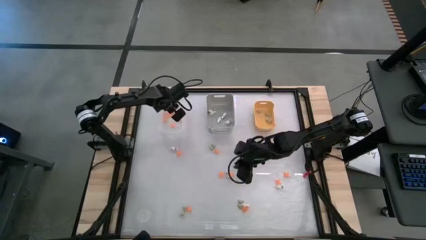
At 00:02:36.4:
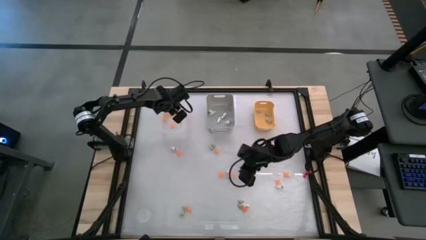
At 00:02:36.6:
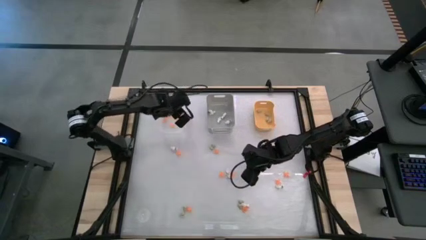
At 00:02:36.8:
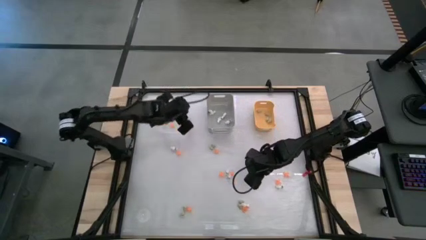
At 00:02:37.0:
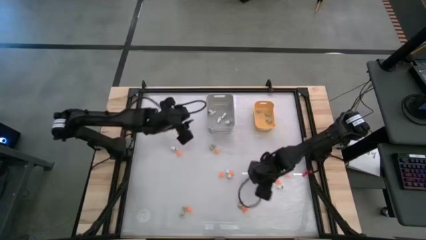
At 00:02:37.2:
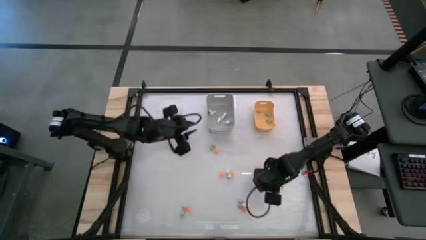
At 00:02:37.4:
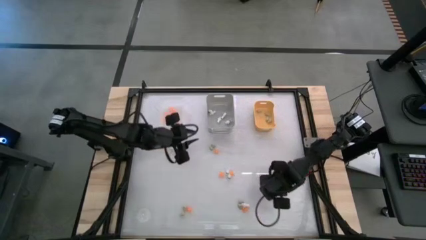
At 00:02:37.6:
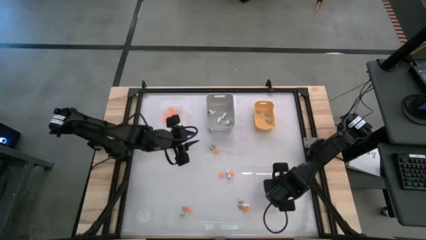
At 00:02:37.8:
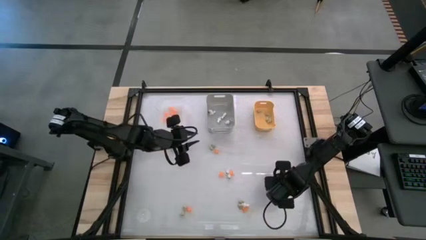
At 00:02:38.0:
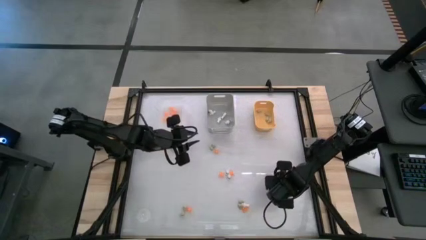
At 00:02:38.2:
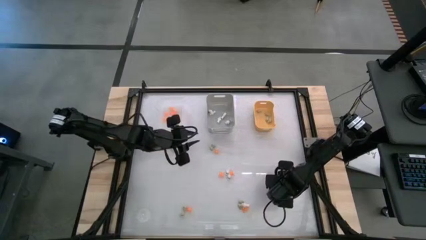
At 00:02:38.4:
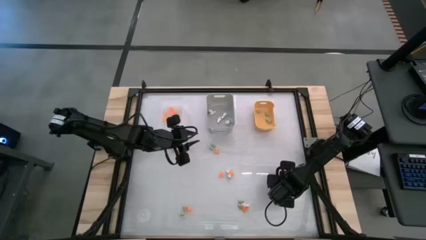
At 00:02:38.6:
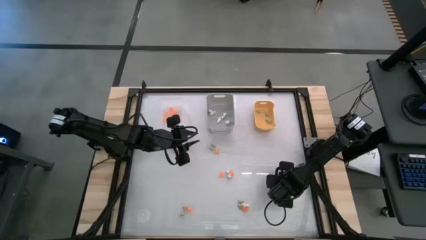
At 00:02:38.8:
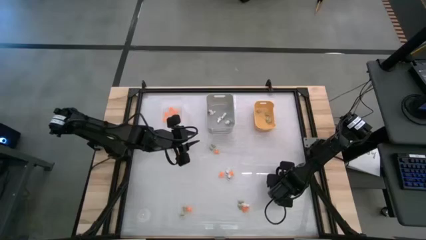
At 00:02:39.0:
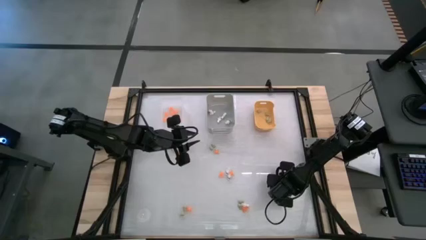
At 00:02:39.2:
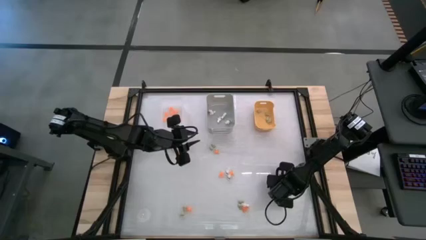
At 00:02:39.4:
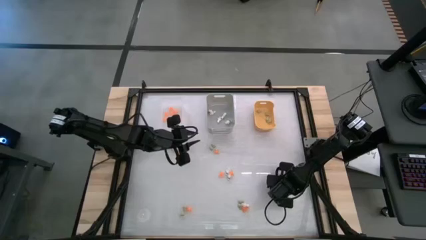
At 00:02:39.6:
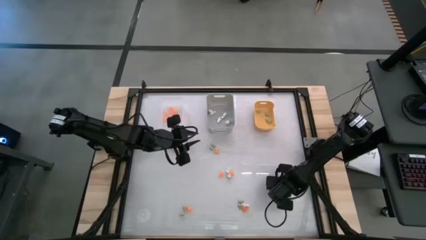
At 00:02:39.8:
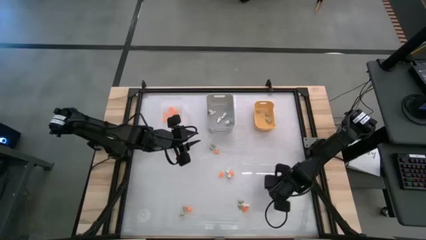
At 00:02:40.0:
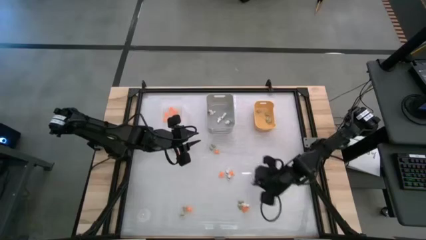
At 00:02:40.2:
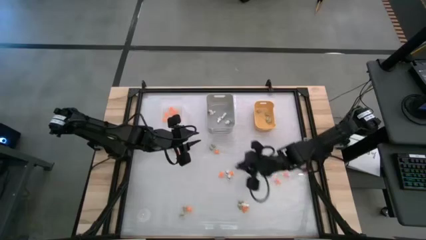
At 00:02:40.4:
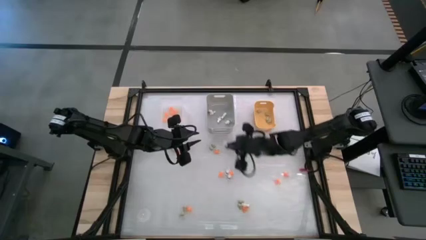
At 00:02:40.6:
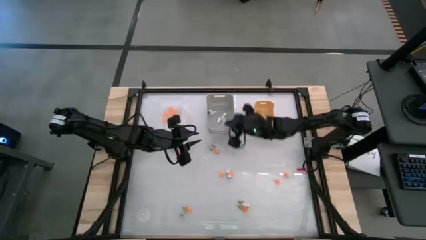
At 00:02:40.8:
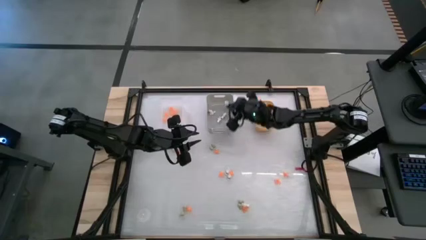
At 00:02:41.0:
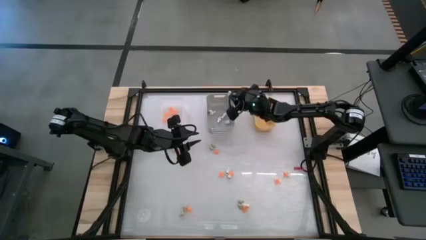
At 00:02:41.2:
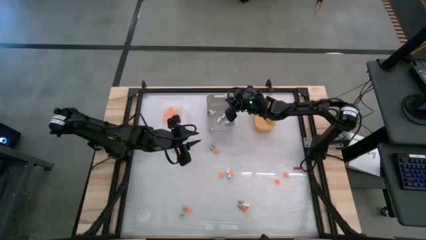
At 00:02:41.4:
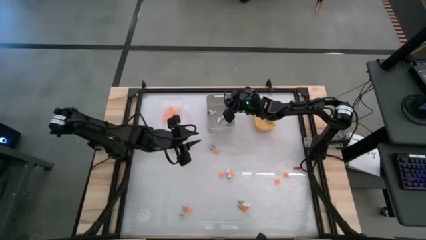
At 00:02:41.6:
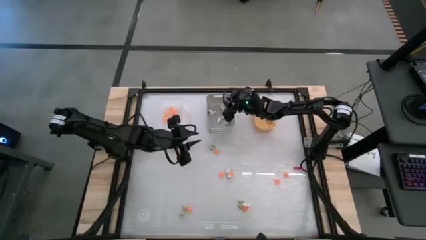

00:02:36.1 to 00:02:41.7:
Task: Sort Halloween decoration
Put the white skeleton toy into the gray bin

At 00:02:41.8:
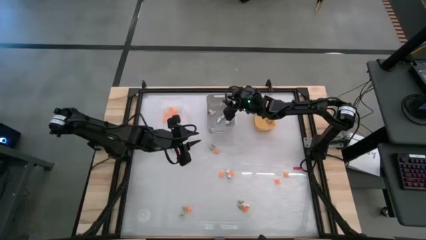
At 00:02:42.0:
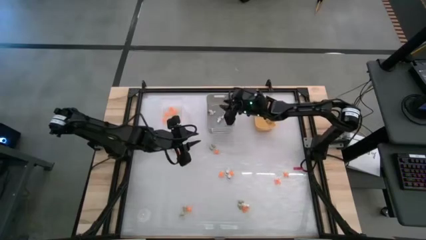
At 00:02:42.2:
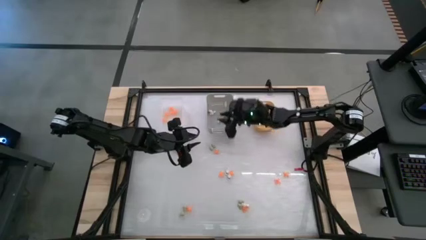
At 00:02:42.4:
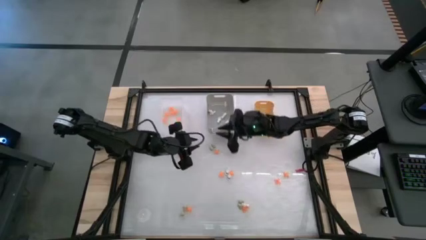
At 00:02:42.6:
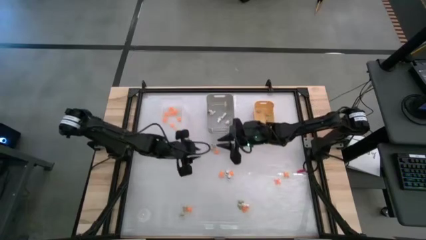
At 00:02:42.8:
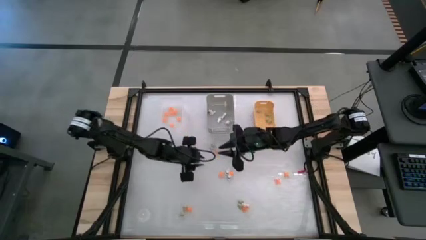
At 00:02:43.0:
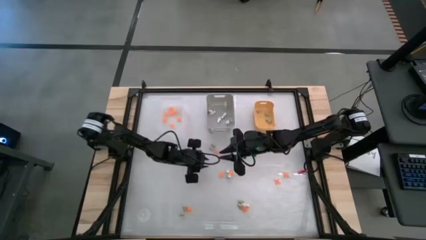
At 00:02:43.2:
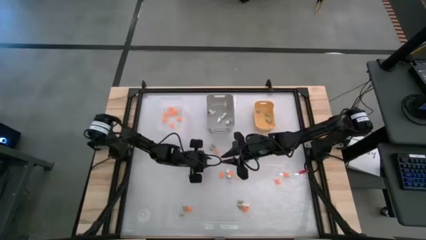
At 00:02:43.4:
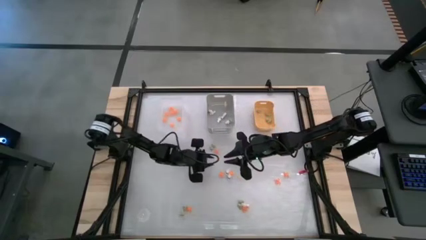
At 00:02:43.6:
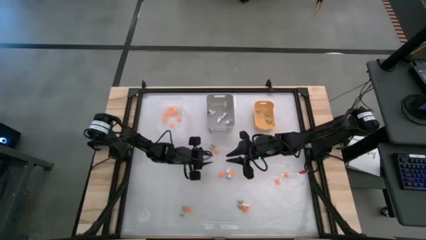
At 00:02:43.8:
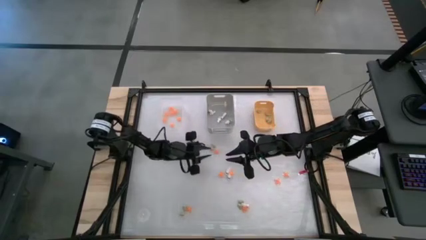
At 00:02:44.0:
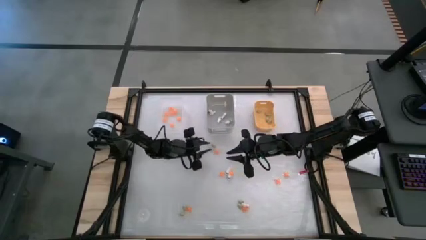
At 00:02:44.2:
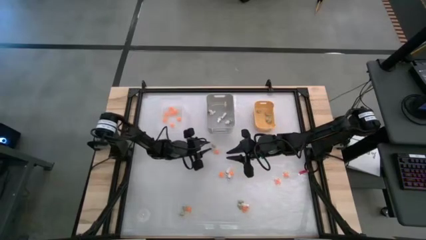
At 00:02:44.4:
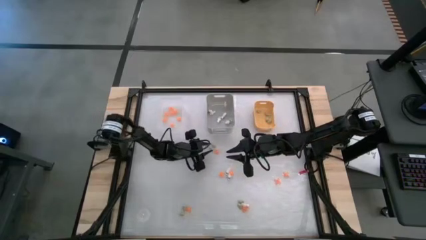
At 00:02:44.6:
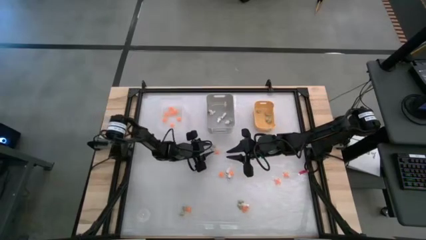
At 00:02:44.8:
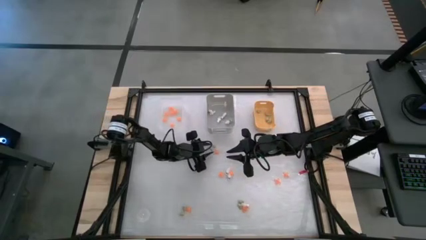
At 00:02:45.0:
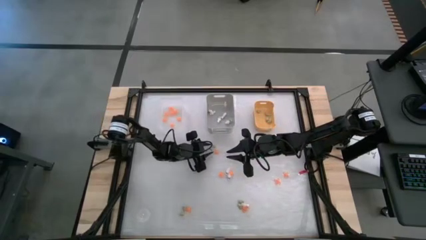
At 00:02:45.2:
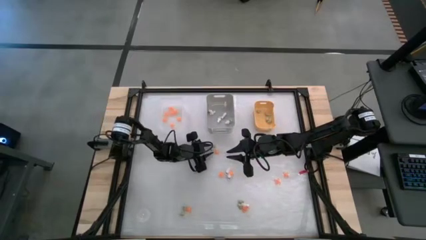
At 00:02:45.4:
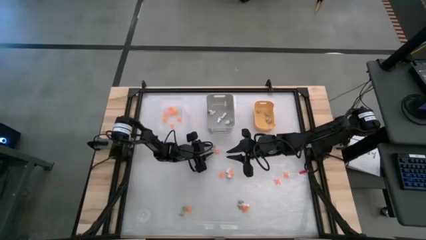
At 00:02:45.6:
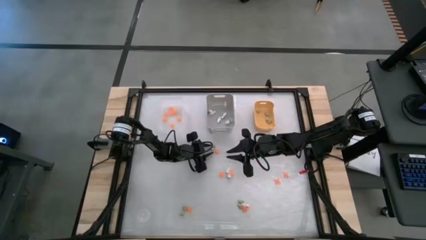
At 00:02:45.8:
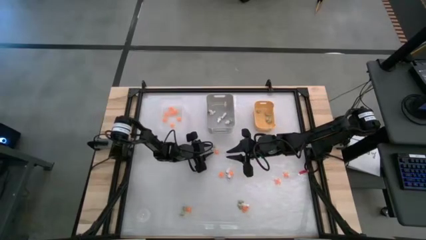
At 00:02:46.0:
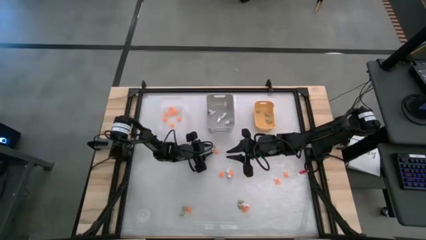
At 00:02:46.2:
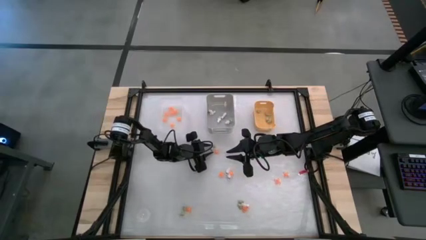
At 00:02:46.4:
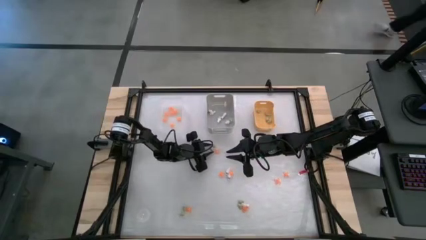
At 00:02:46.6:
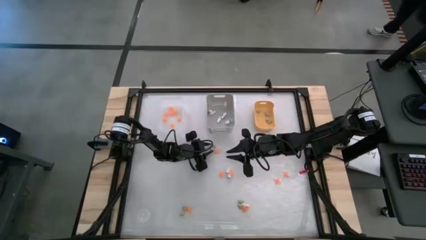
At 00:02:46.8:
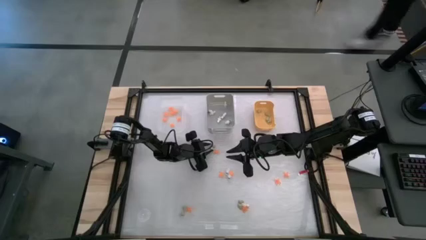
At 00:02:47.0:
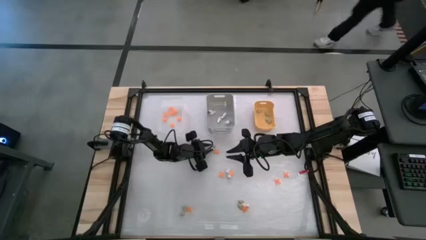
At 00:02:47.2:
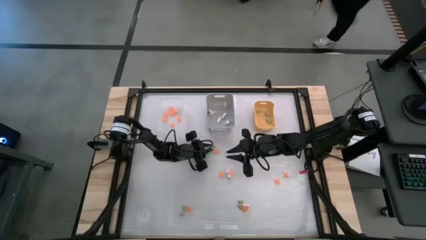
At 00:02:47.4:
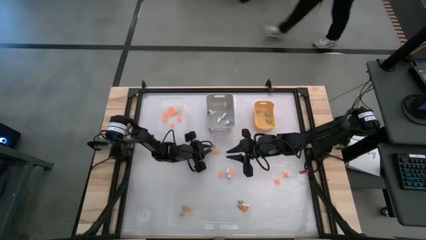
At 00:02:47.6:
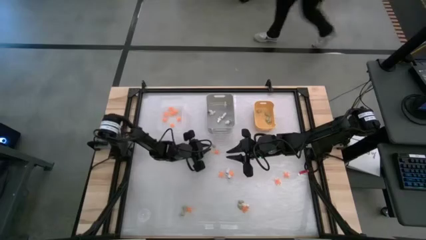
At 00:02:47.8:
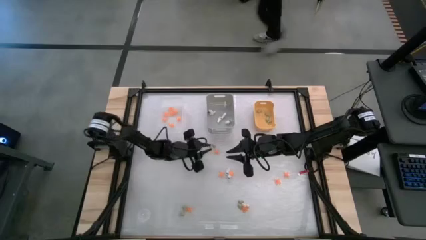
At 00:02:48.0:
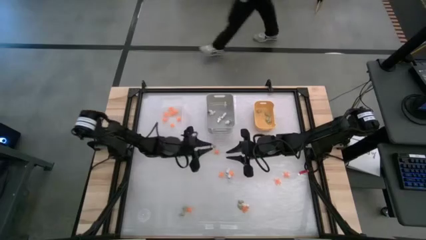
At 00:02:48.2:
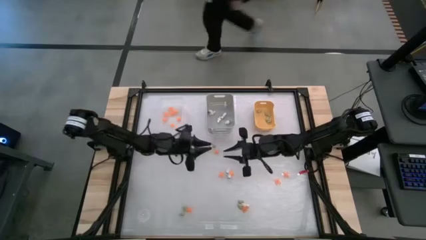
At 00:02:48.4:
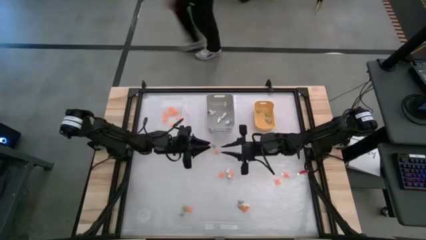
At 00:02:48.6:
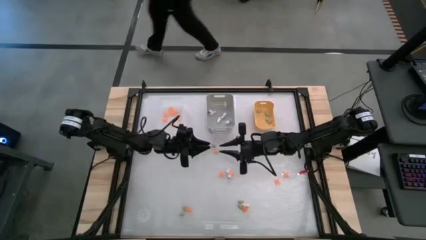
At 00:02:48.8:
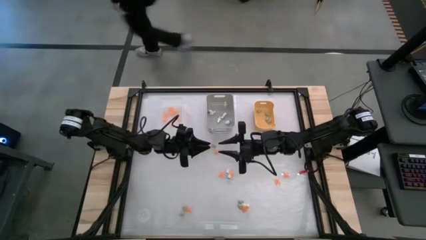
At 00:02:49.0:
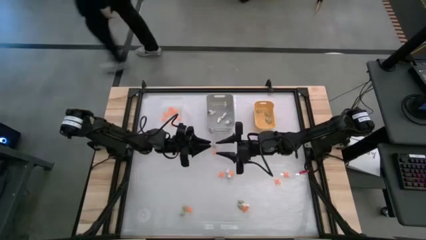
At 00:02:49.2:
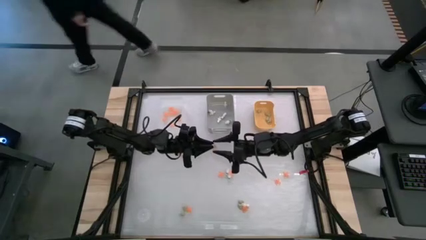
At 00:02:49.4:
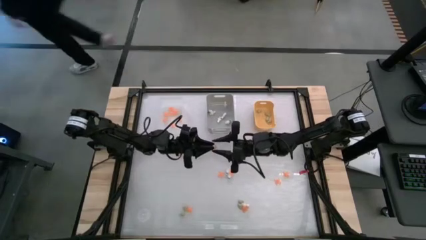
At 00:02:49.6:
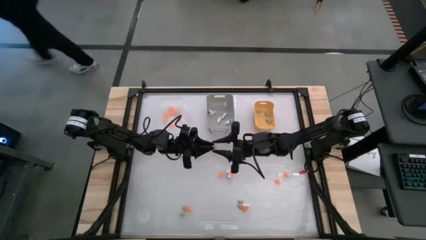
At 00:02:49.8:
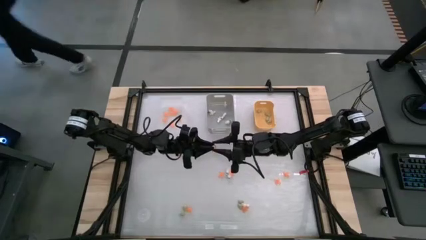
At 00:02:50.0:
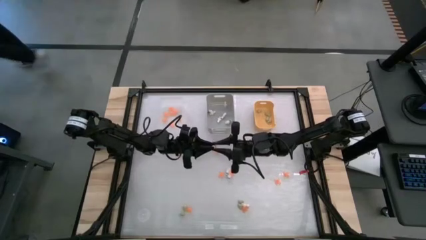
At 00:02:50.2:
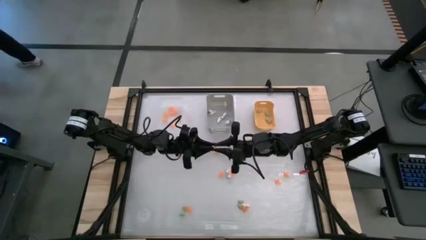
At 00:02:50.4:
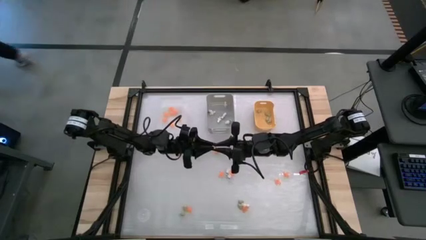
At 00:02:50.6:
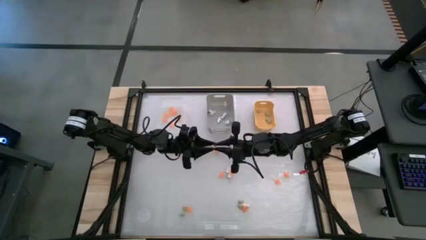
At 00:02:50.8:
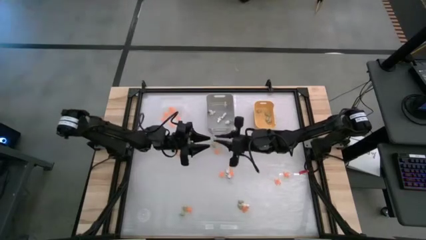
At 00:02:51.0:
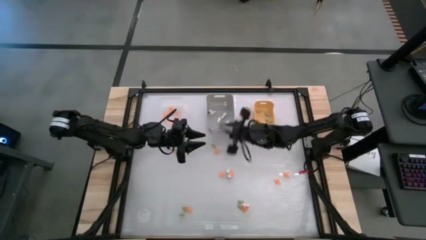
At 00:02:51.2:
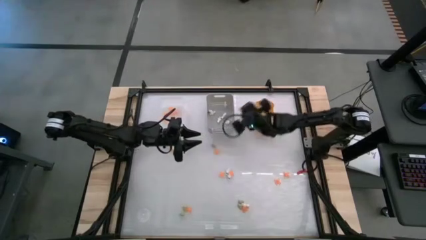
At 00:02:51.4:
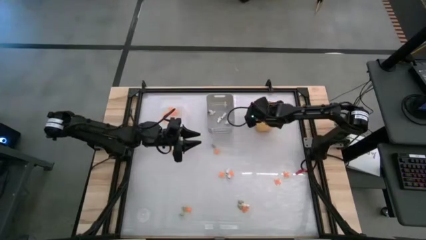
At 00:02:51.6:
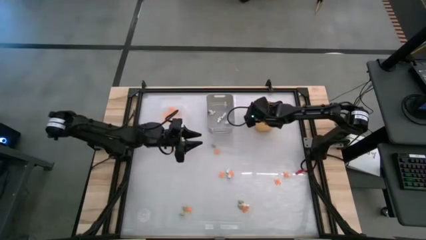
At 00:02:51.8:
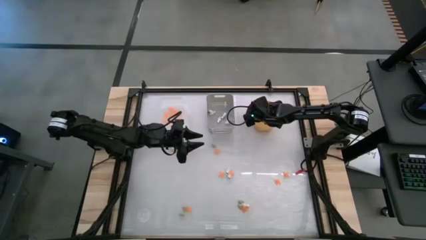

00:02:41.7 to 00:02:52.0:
Put the cream white skull toy into the yellow bin
